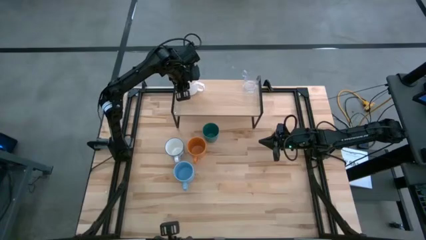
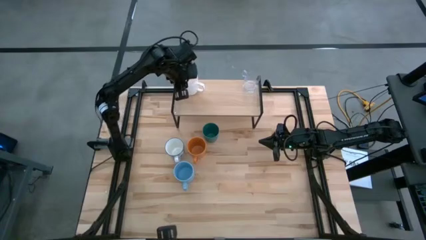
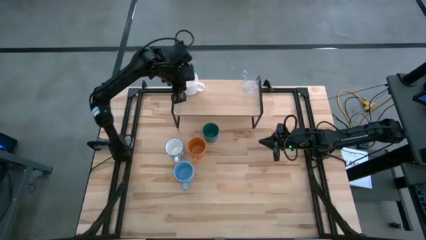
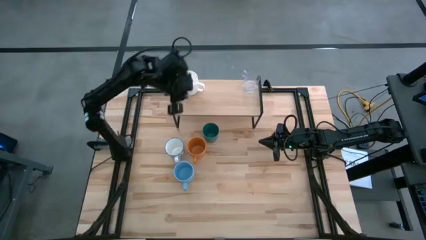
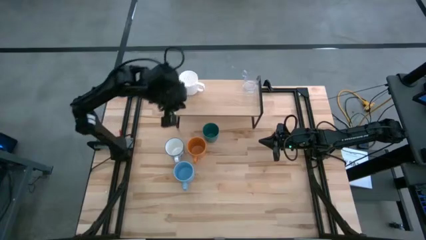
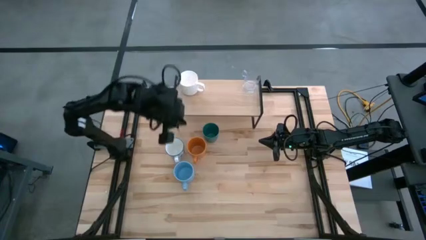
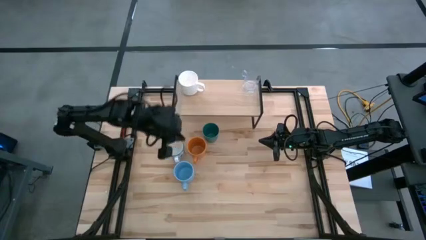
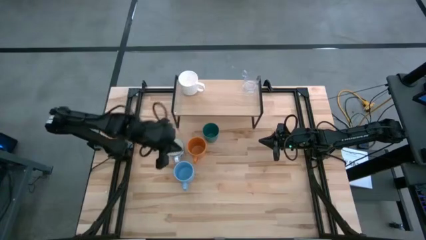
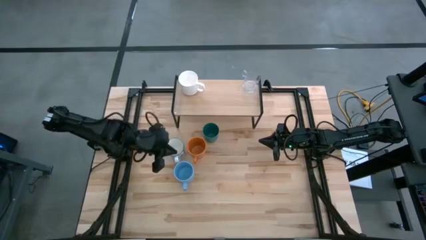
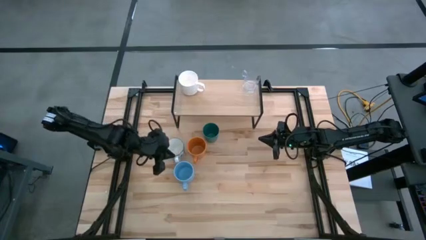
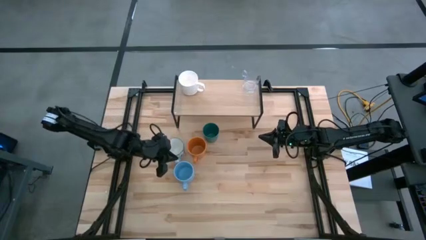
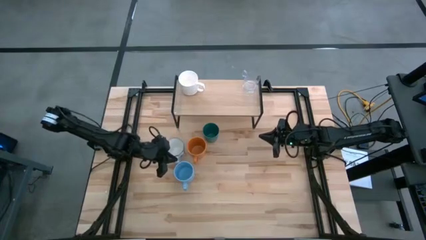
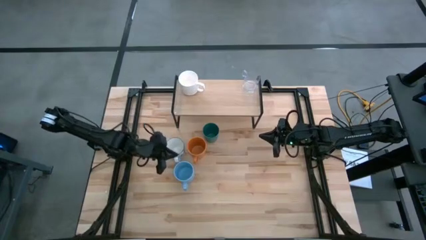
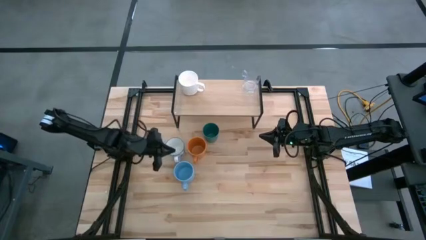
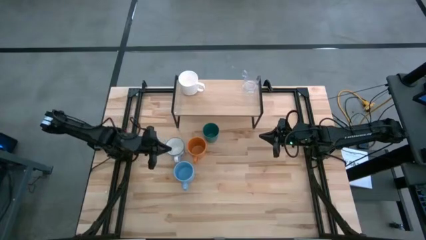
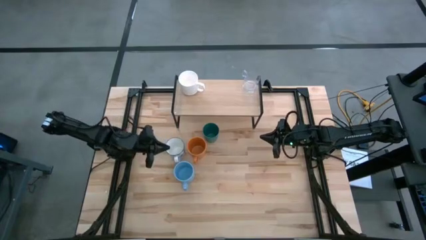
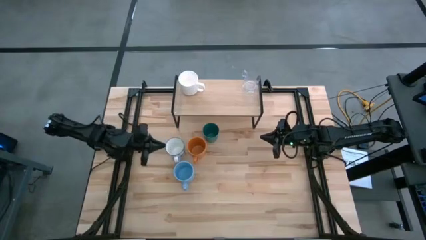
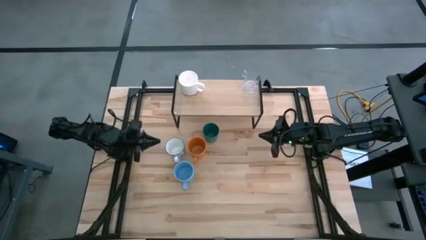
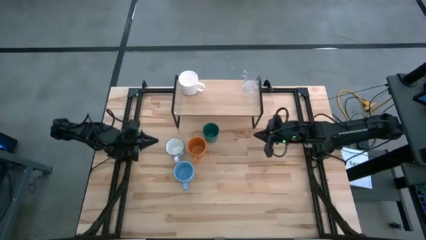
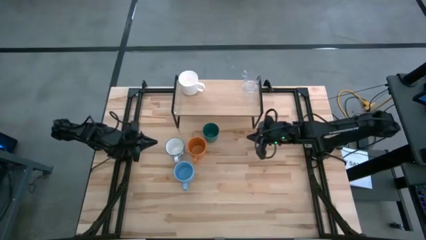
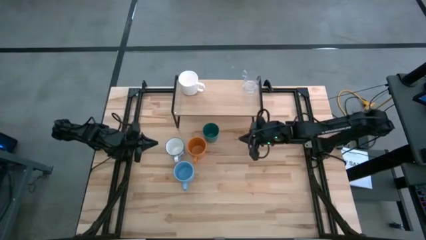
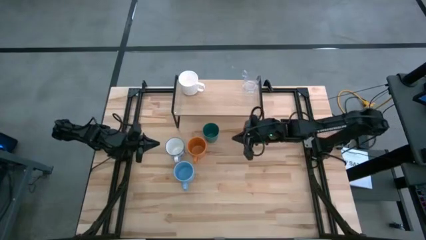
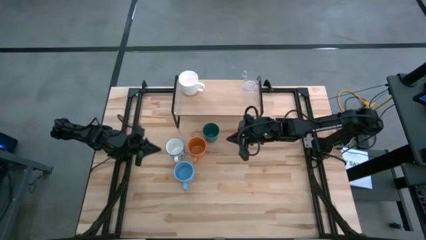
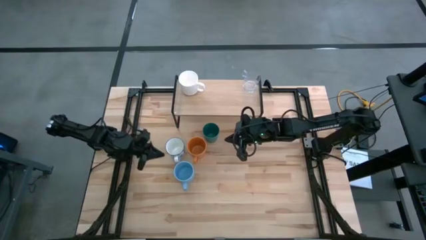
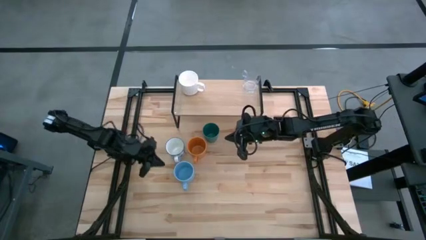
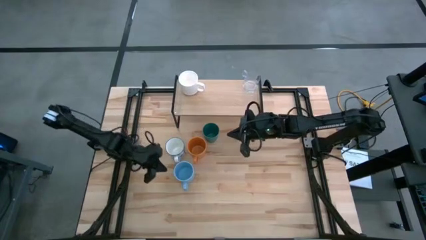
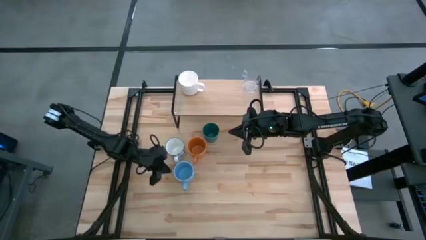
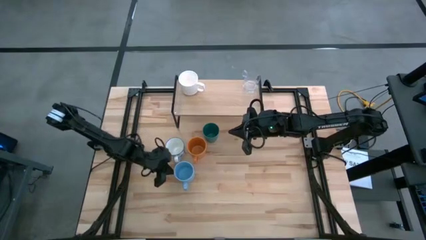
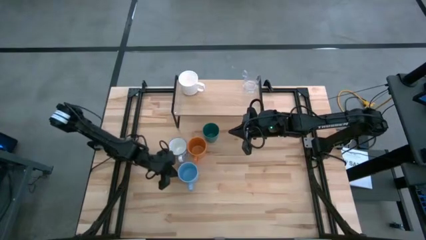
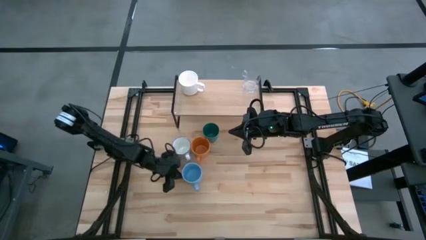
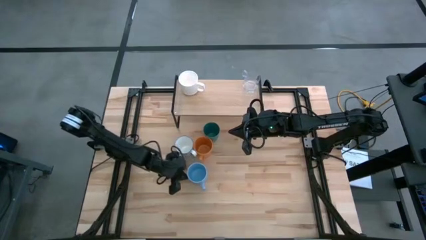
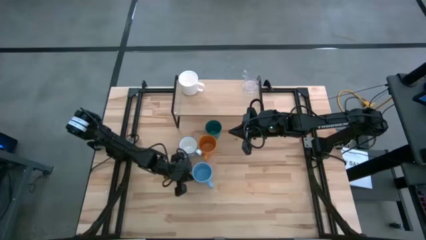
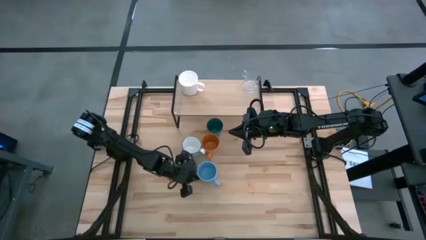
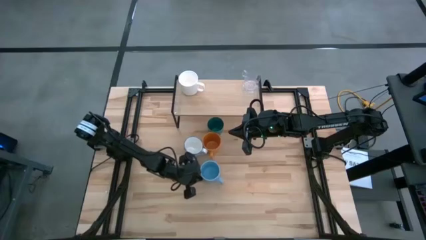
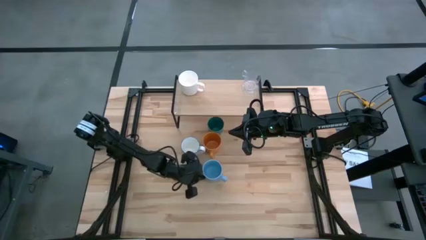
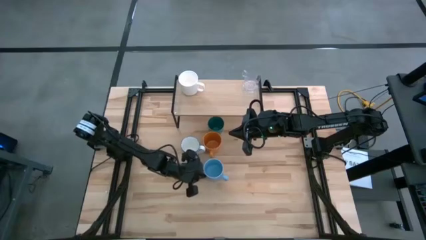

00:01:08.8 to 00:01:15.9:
Task: Stack small to large cups/mugs on shelf
Adjust the mugs on the table

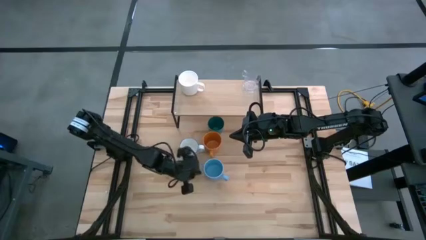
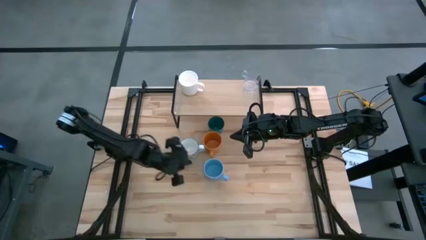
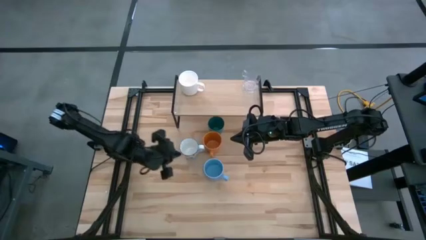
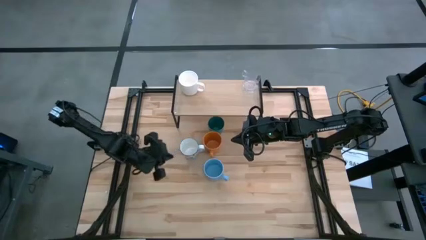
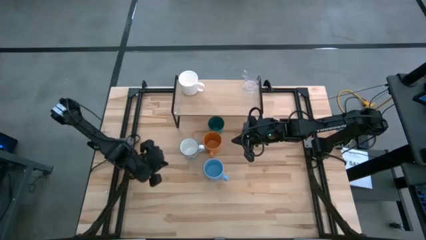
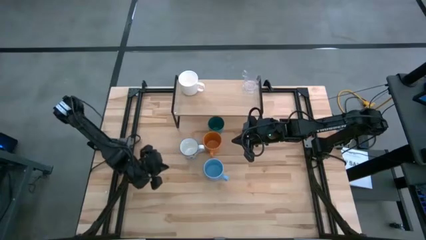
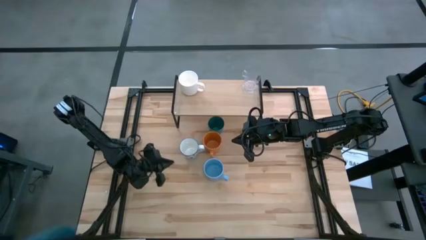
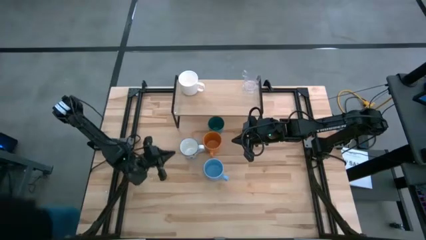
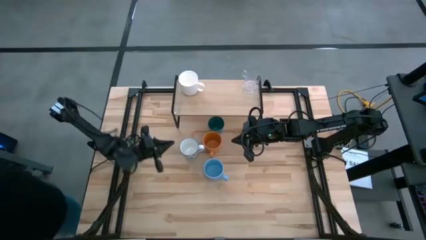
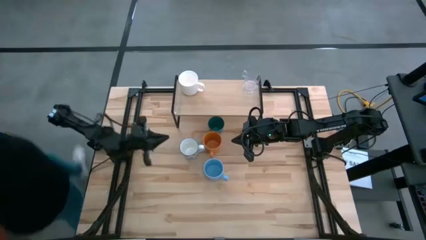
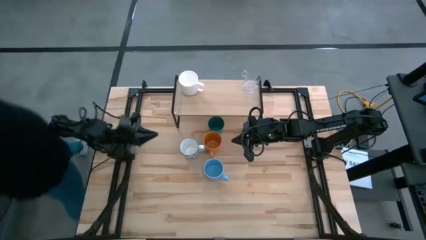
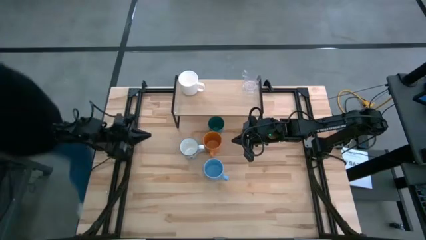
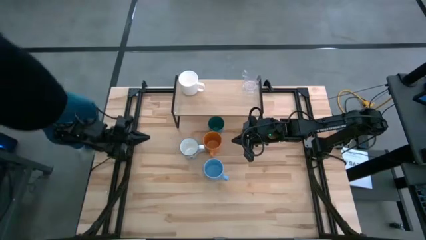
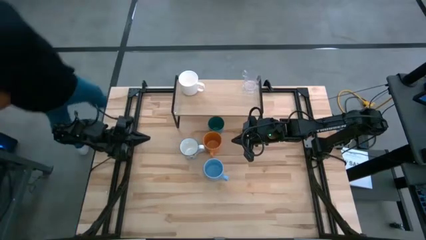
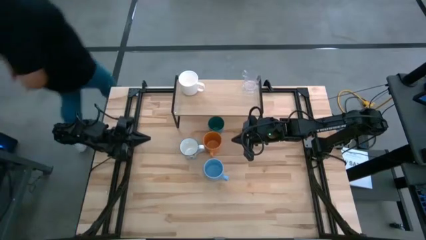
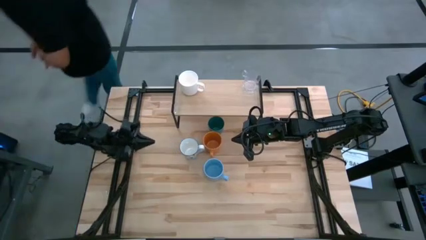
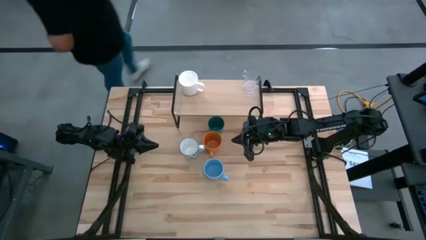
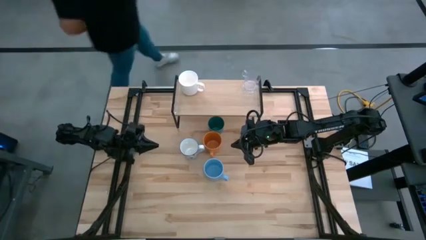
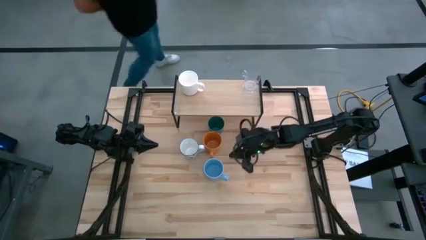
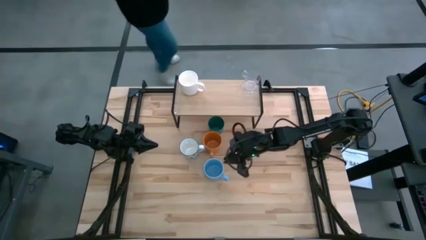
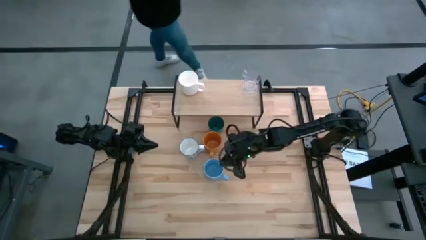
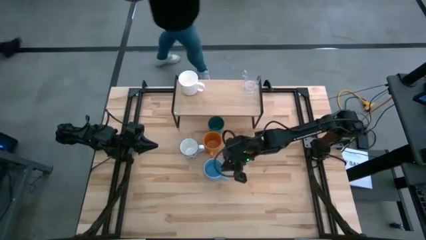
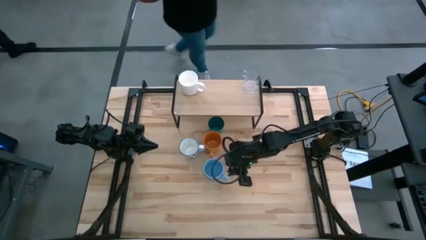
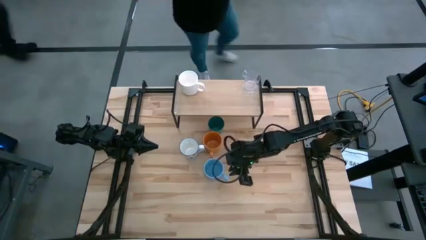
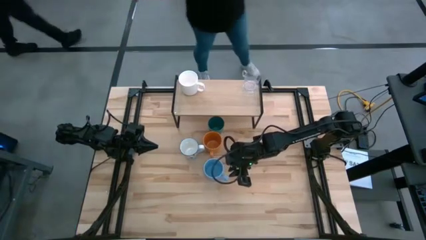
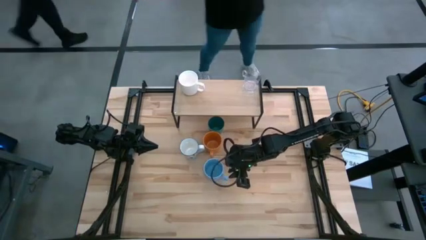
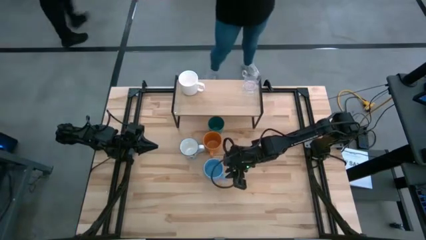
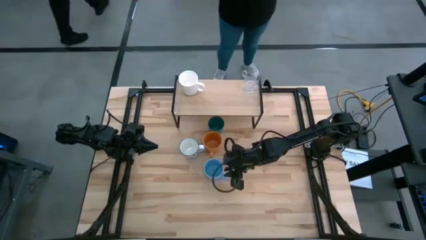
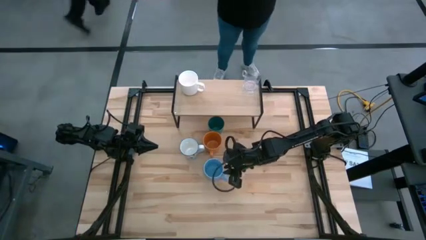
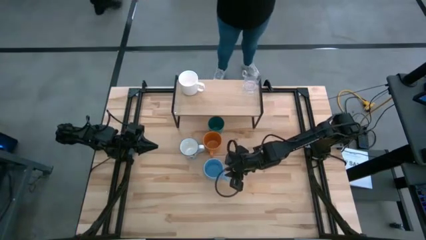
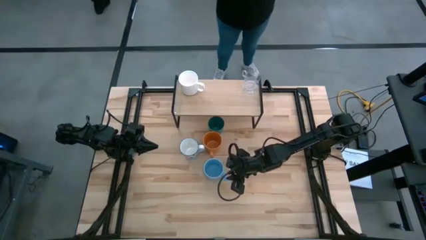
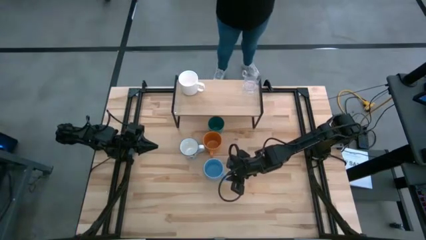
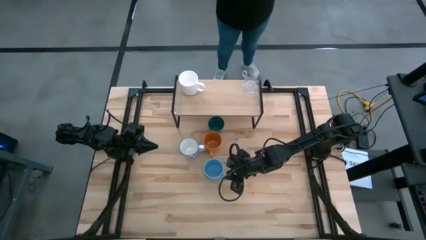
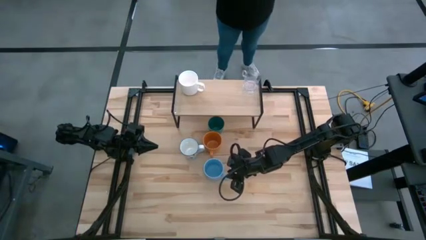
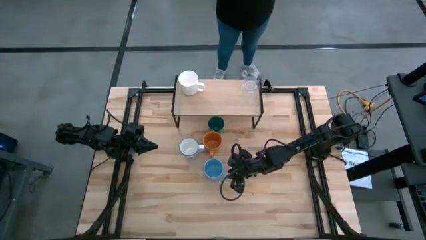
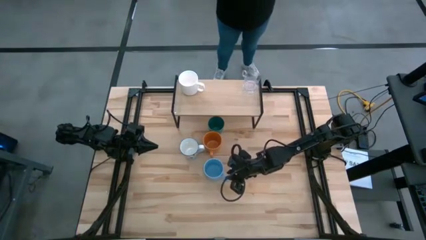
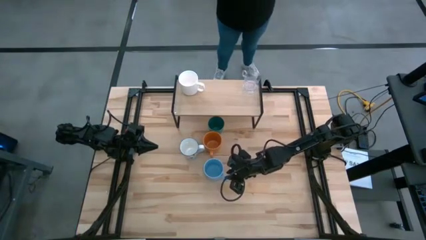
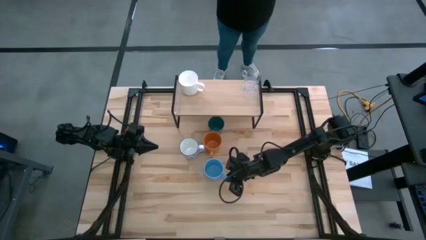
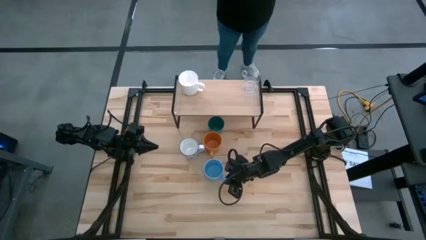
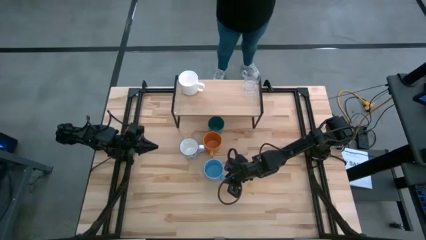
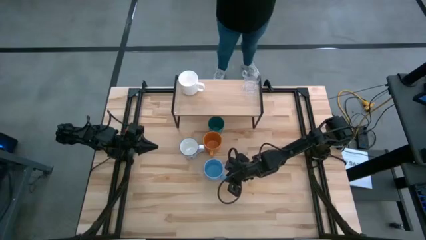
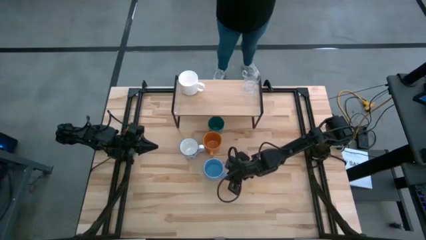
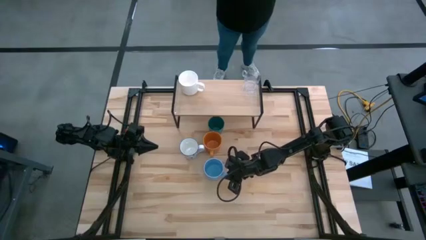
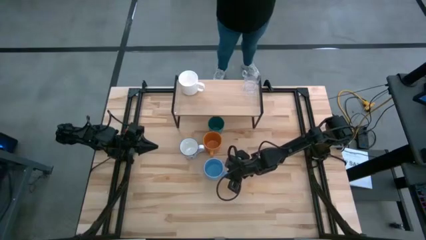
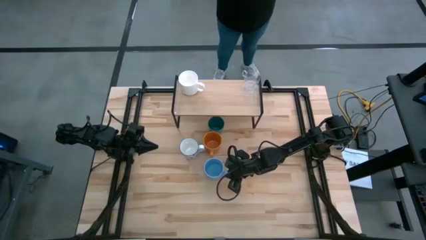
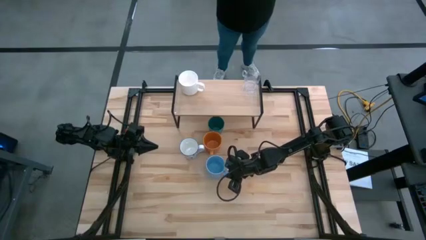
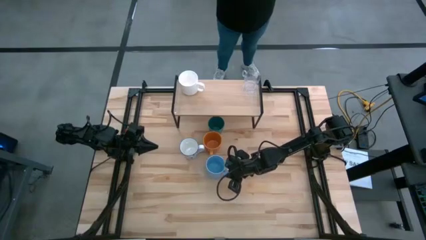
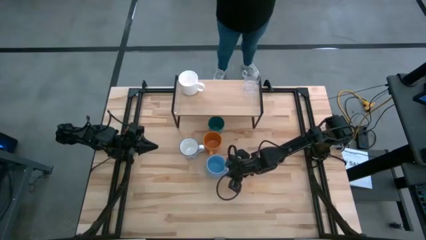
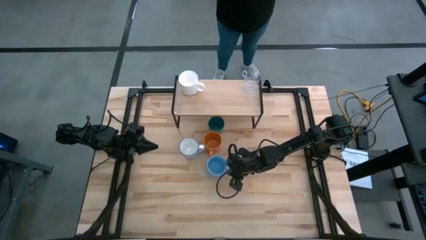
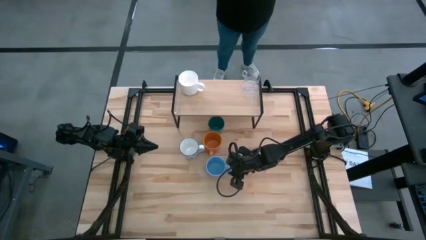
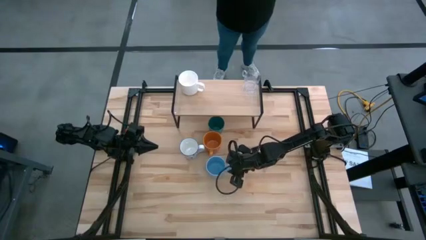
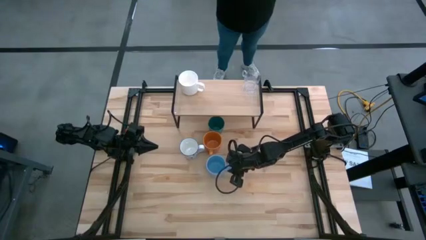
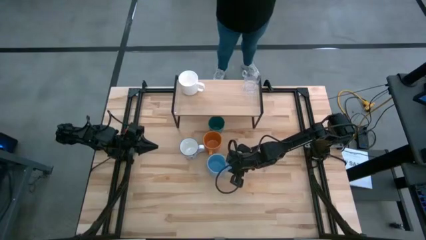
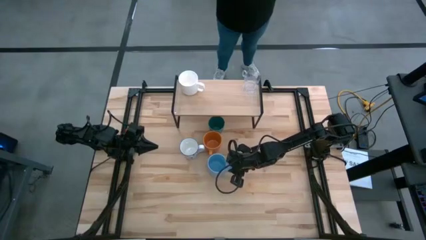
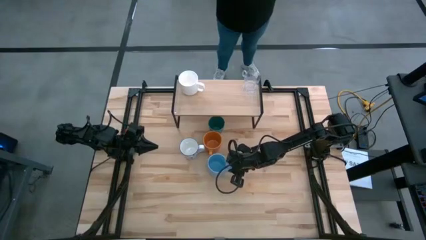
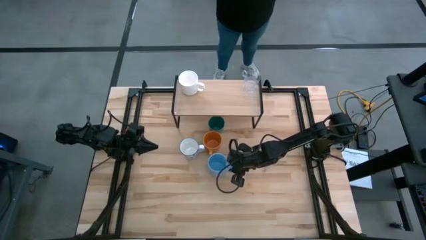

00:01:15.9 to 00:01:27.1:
Put the blue mug on the shelf
